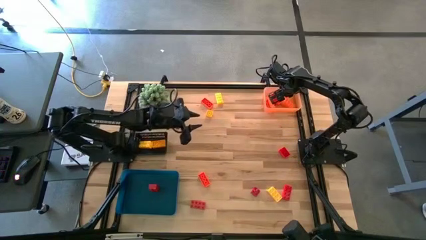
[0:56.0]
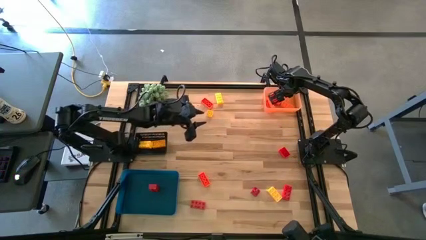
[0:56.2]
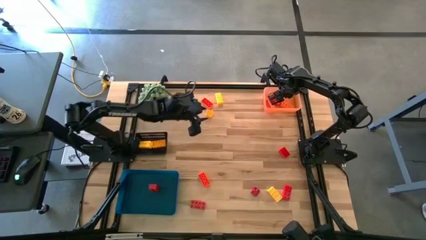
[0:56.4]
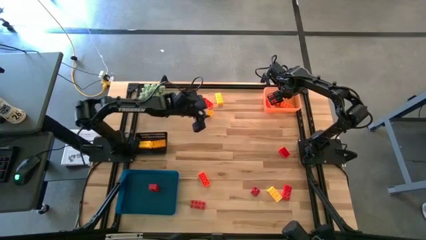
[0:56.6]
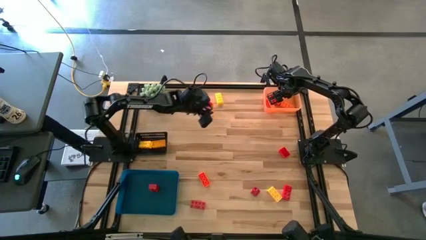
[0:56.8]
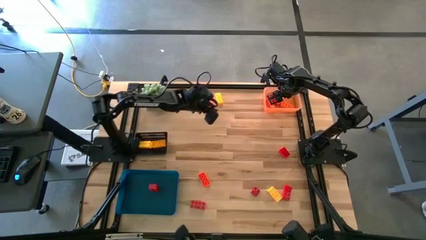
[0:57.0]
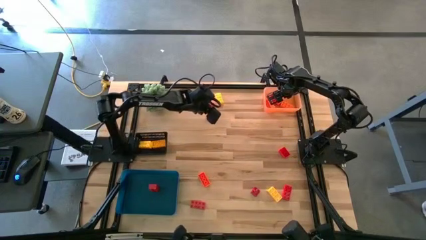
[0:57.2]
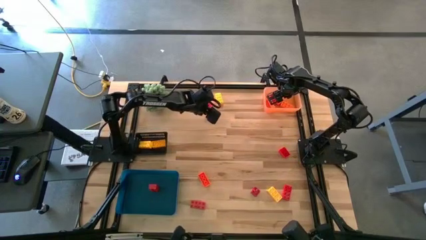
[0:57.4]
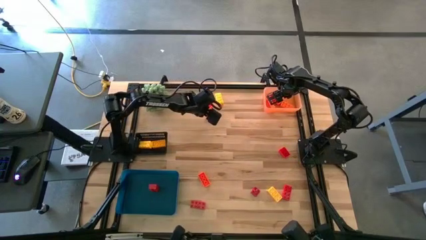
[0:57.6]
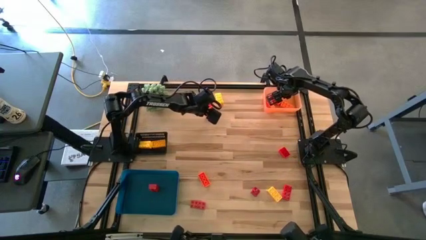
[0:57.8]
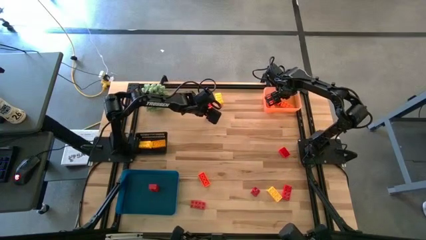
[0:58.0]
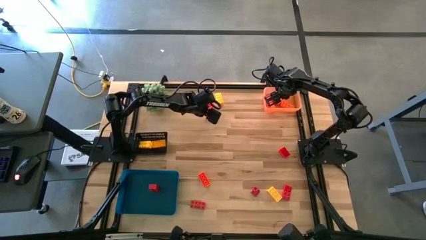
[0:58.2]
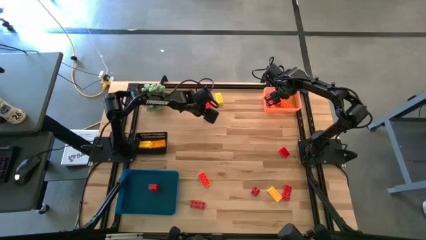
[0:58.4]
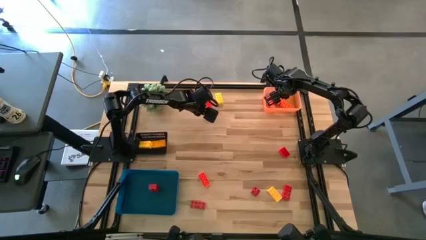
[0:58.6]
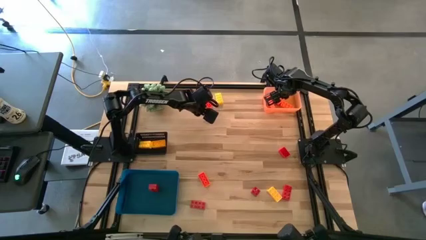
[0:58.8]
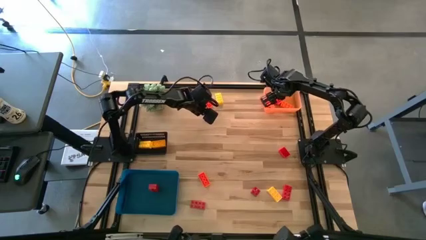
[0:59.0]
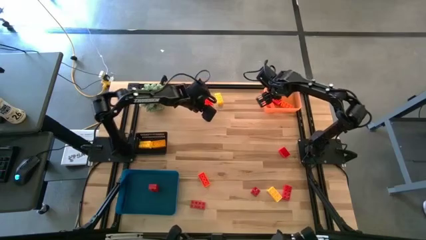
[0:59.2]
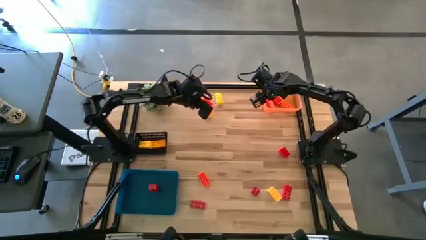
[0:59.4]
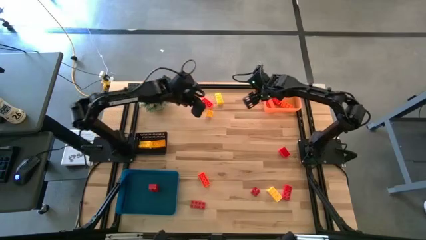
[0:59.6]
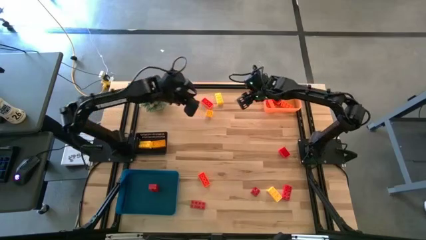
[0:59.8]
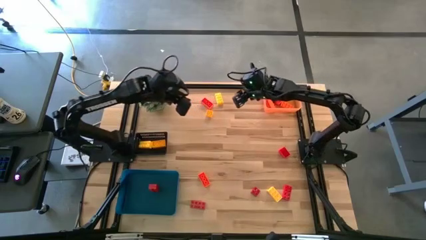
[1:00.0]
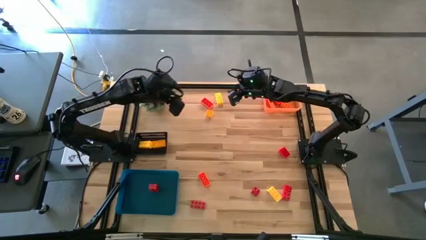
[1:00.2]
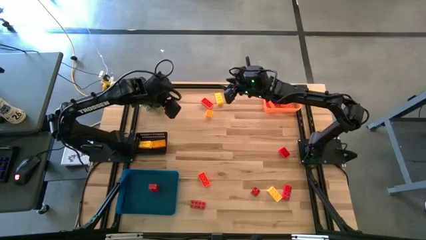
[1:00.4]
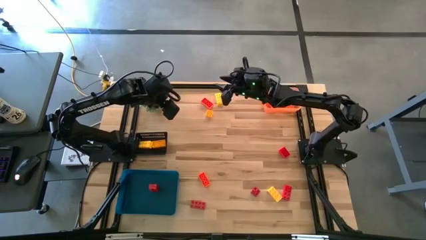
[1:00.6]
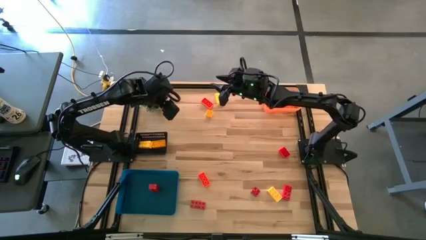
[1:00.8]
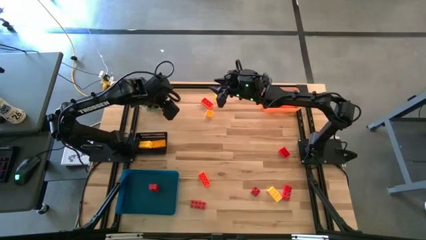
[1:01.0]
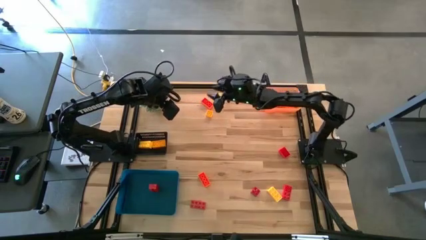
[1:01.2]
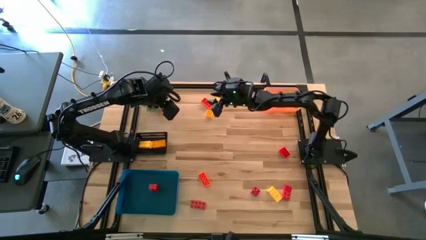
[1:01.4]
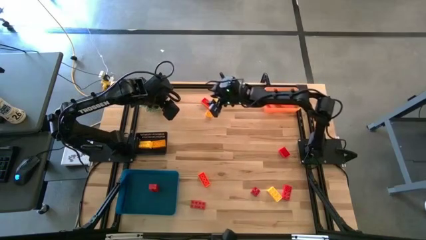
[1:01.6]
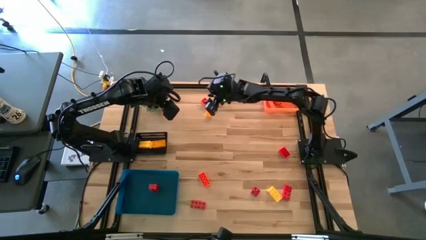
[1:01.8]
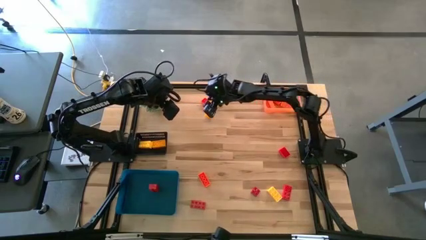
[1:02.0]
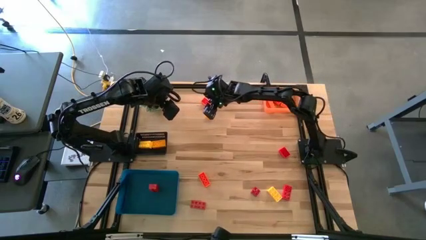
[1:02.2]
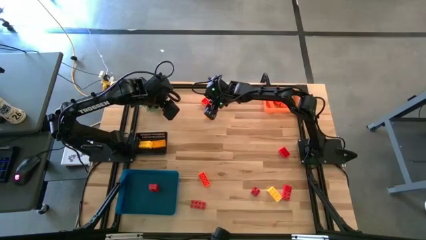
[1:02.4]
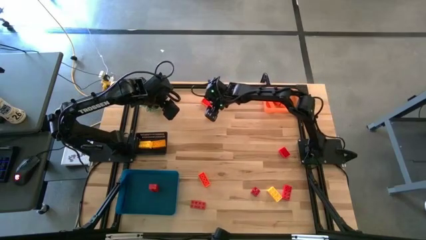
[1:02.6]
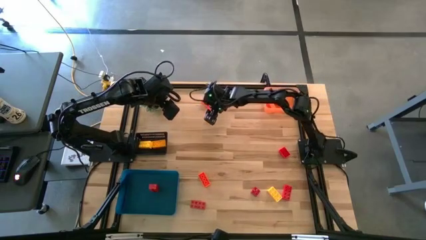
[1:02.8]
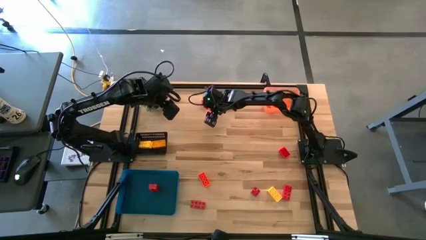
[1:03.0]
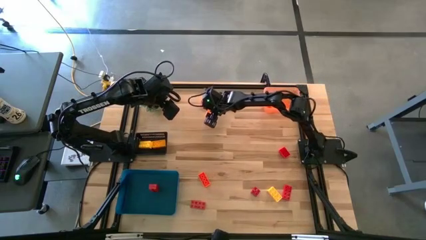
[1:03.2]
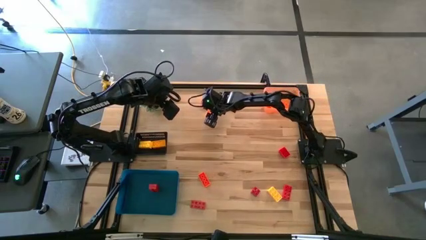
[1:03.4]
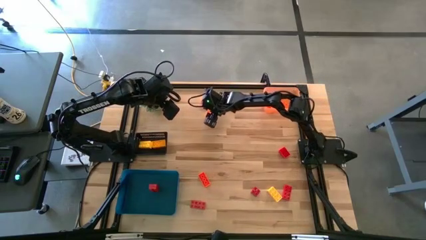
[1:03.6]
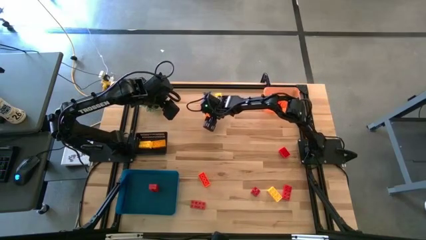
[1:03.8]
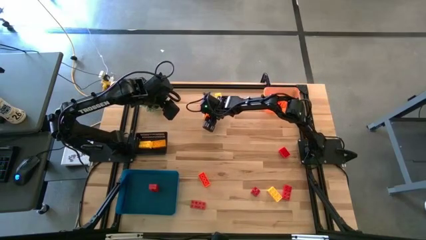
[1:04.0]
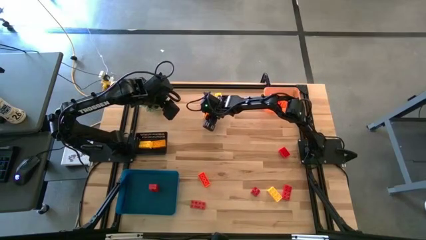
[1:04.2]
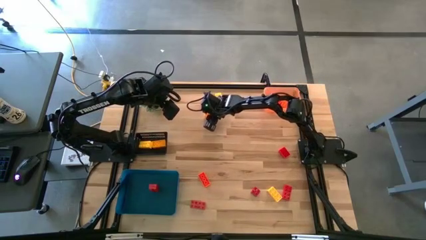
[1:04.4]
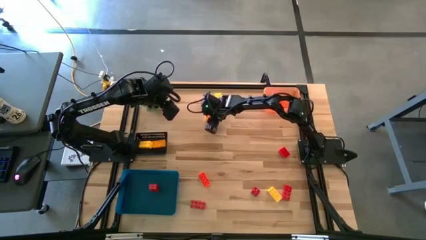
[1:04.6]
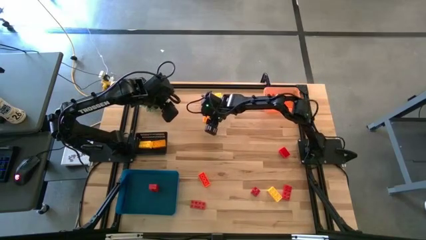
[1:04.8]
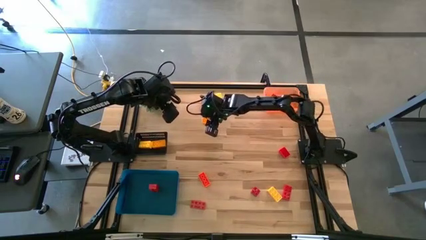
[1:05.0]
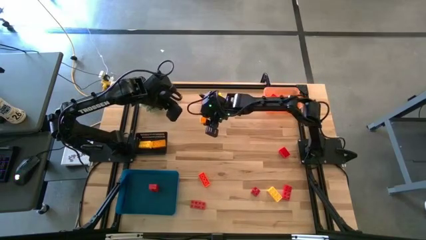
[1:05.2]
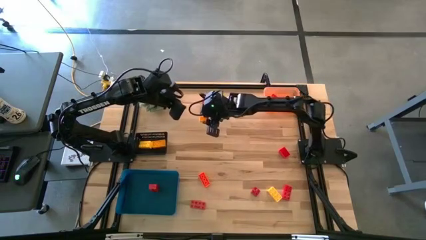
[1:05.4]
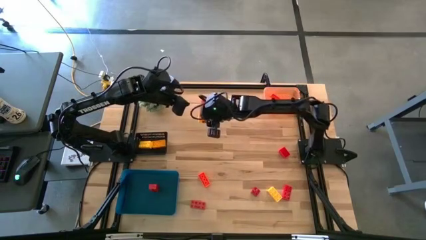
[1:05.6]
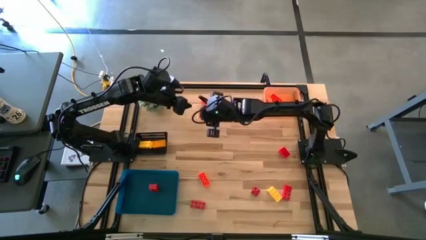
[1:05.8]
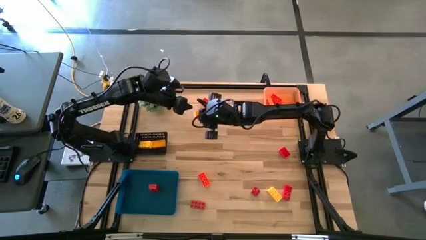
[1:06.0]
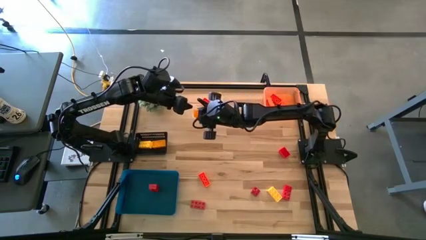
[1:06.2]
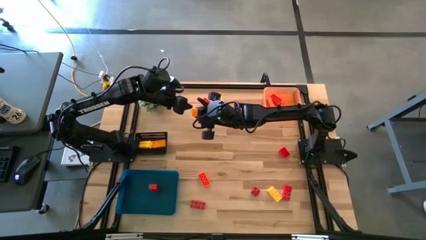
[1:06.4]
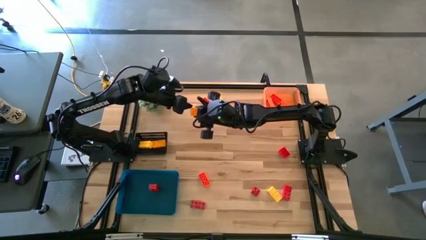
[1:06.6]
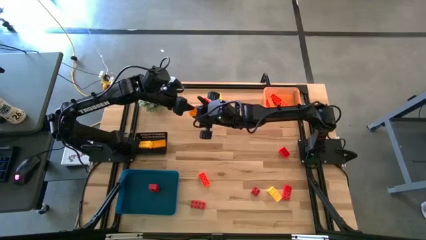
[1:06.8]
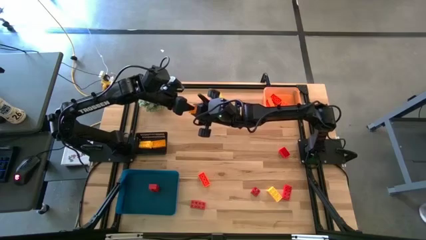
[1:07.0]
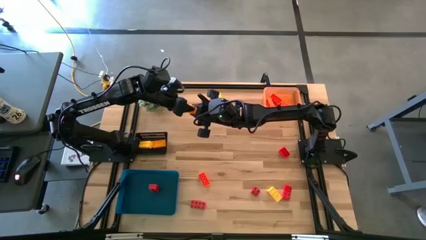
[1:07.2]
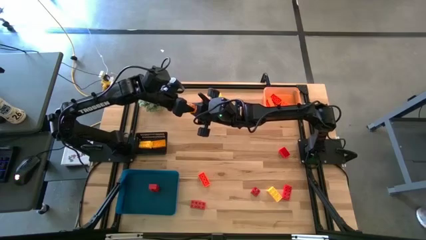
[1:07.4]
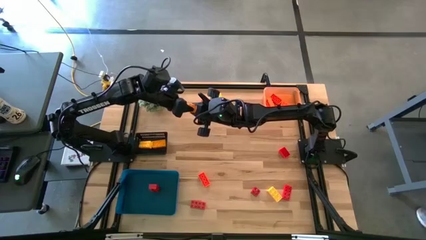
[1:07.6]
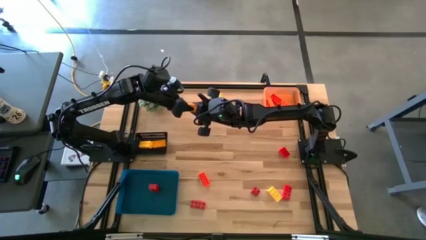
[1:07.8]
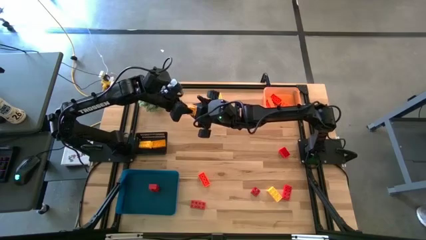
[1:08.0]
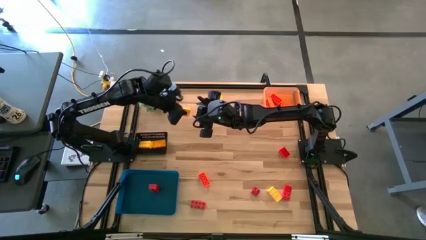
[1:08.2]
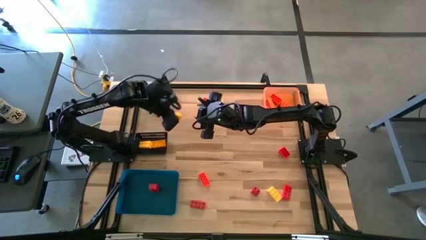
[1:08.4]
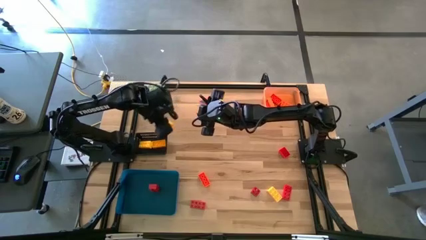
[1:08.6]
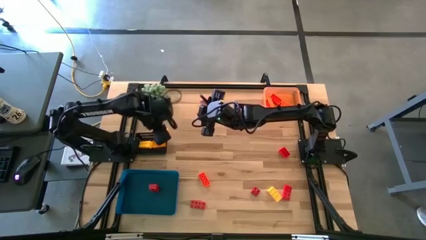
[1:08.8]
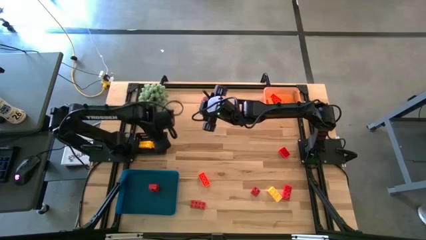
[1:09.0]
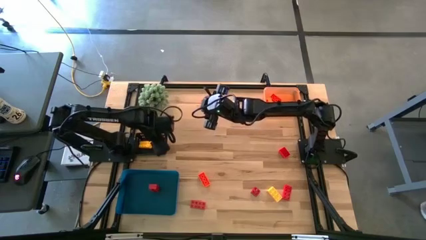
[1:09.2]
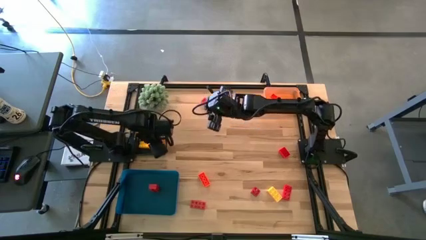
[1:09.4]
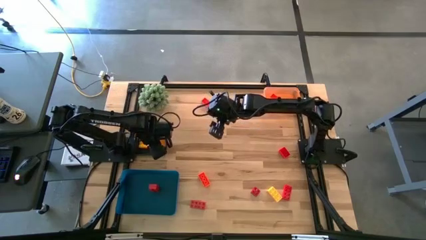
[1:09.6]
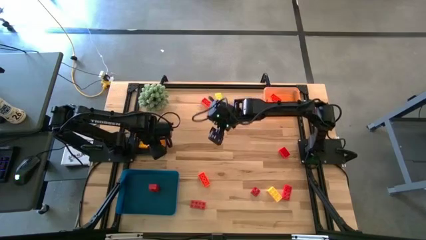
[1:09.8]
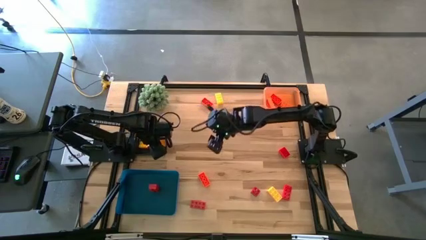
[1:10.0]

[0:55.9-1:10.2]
Task: Sort & place blocks by color
Put the yellow game piece into the black bin
